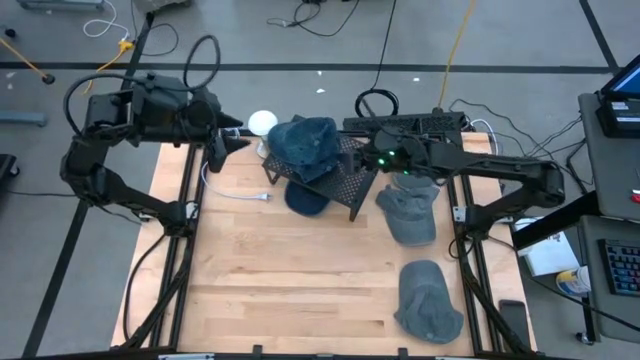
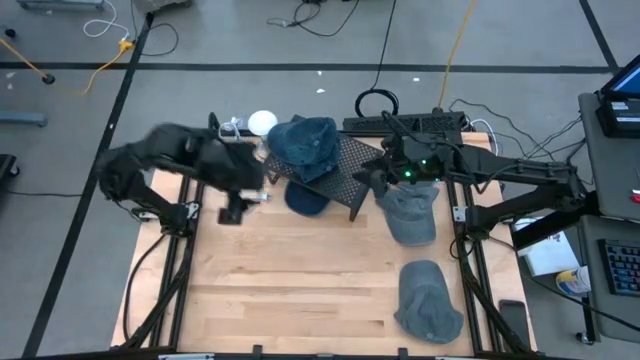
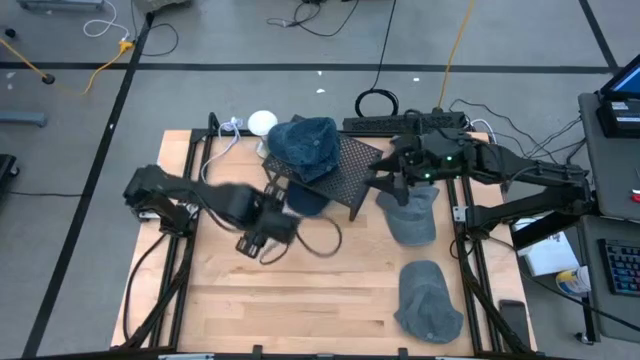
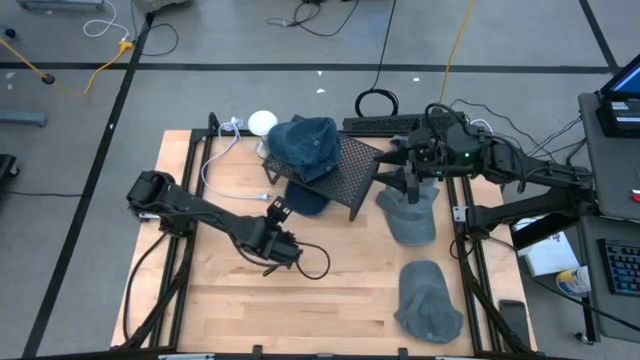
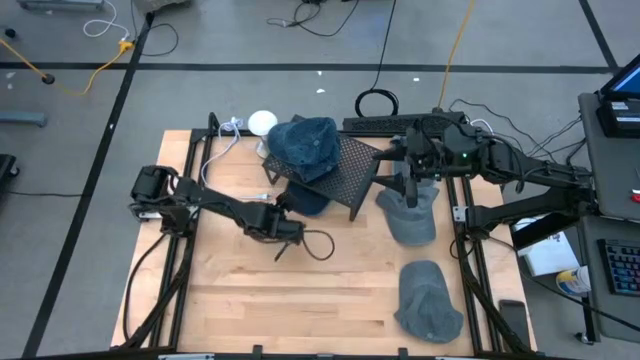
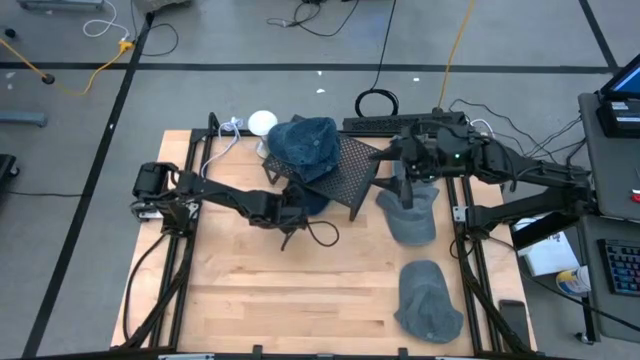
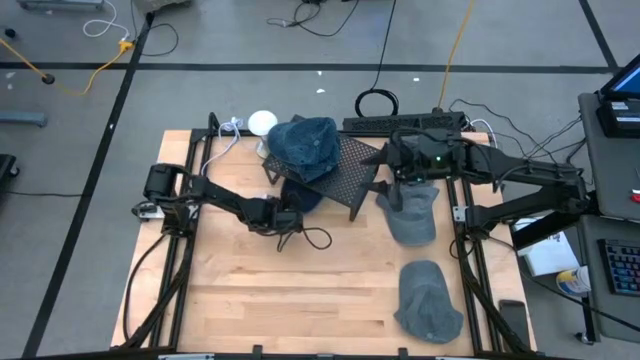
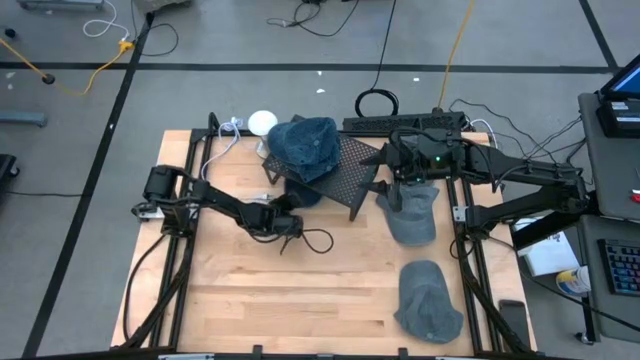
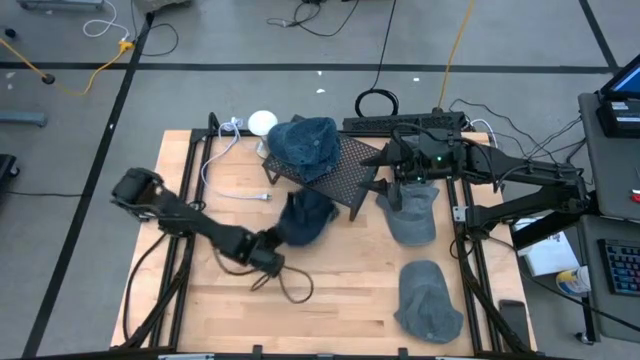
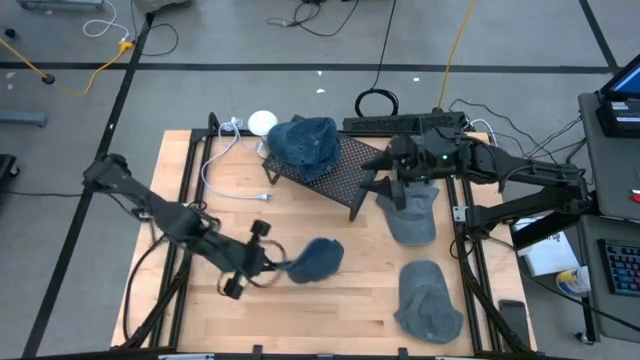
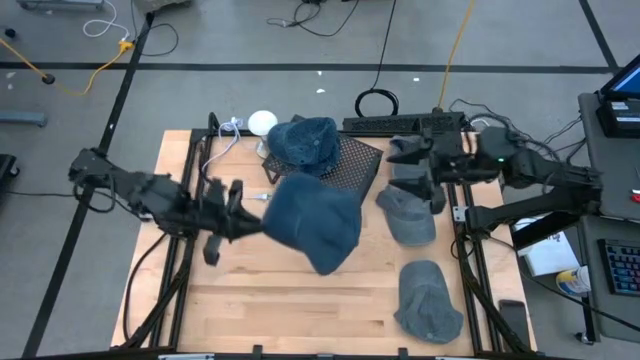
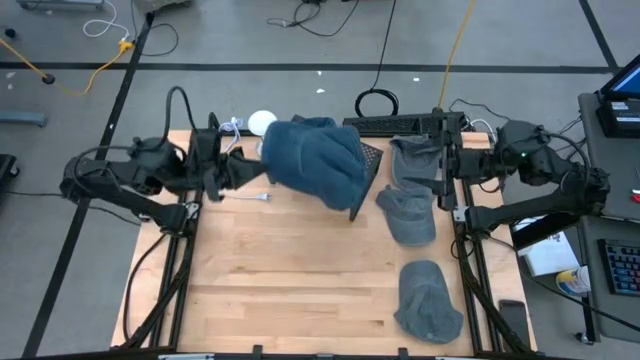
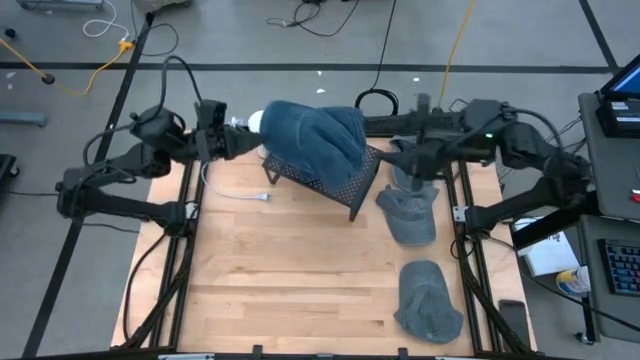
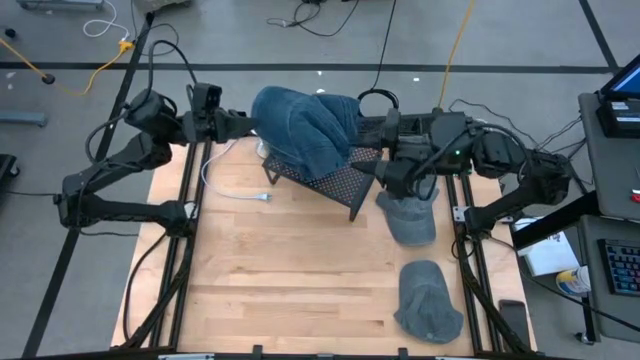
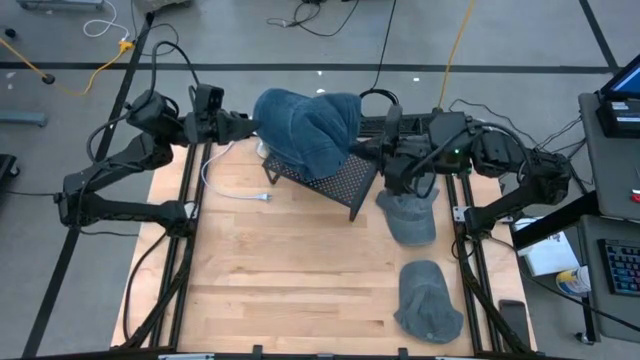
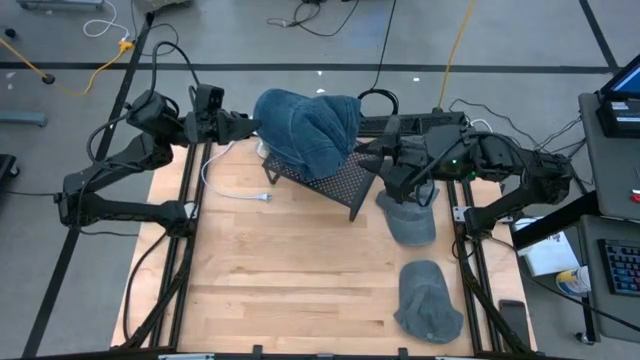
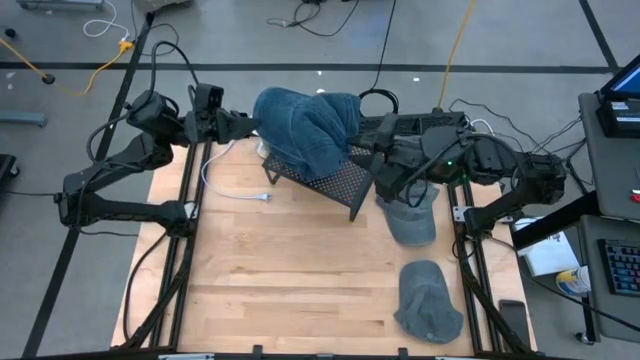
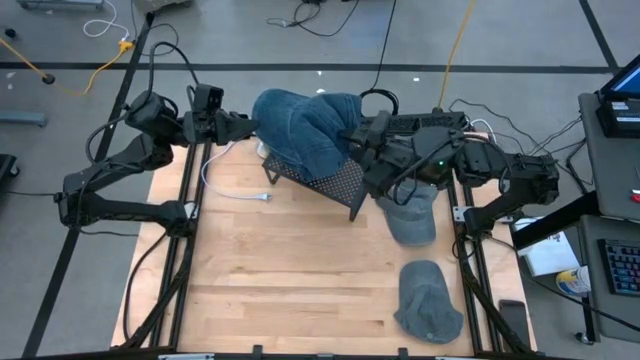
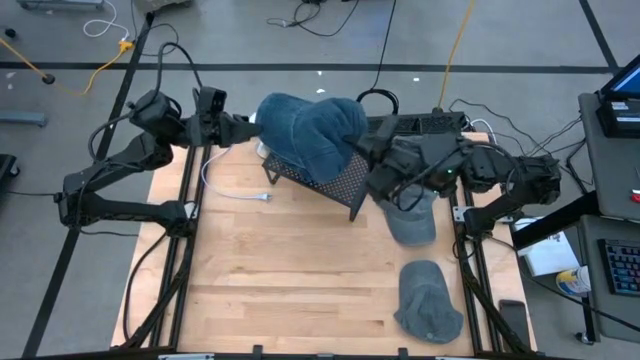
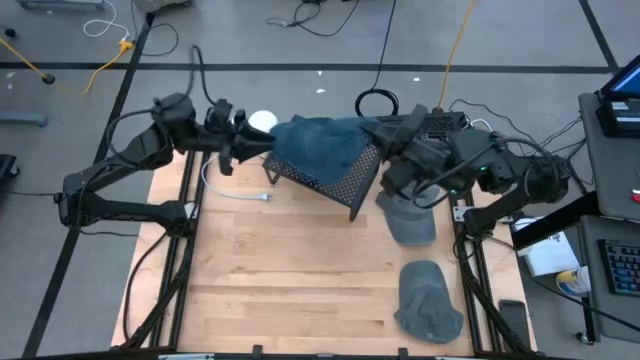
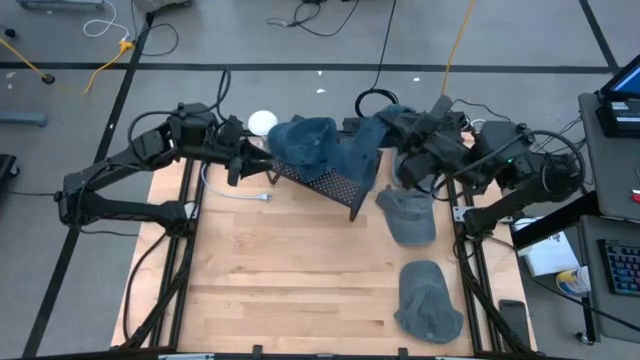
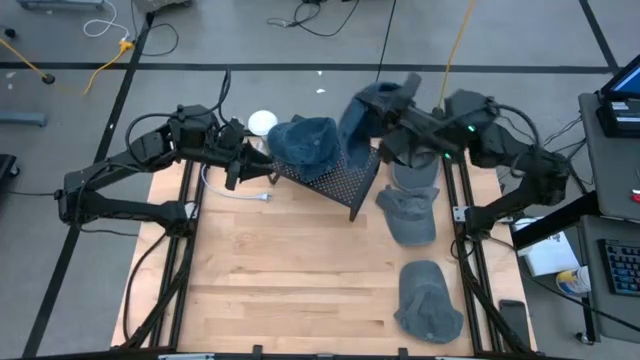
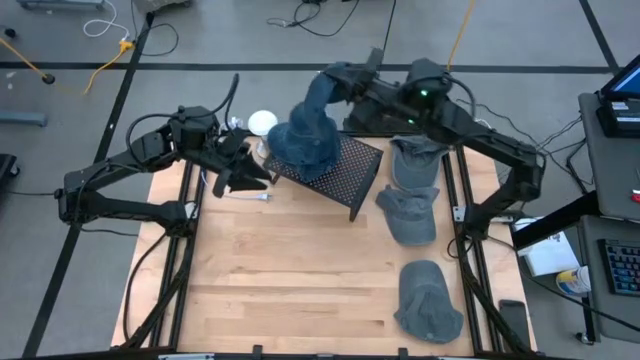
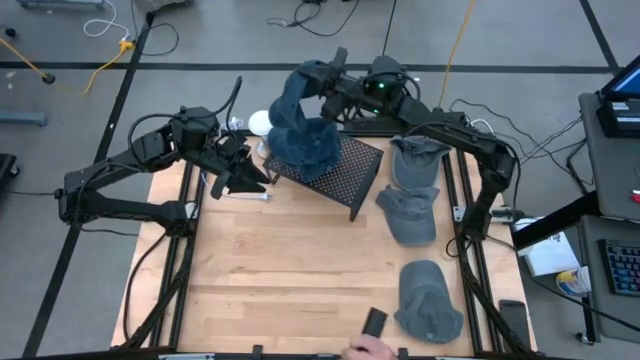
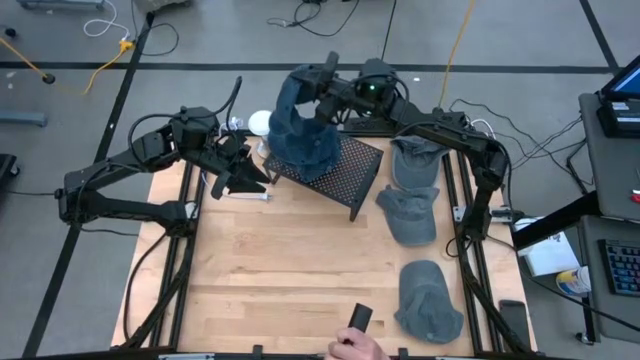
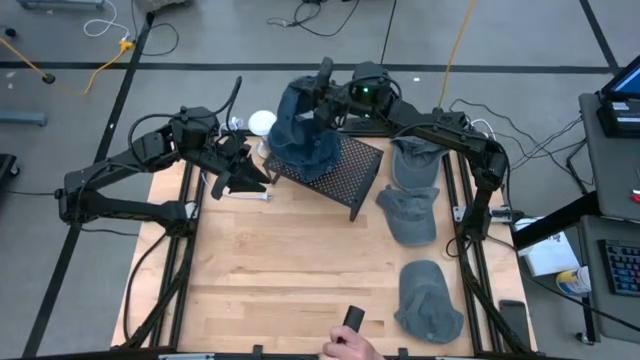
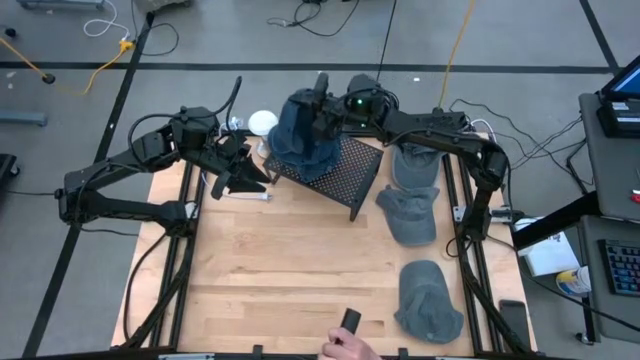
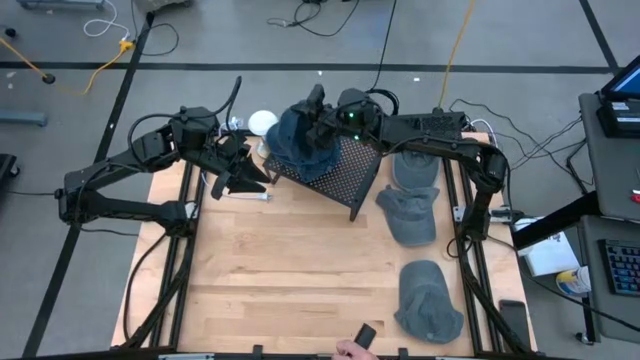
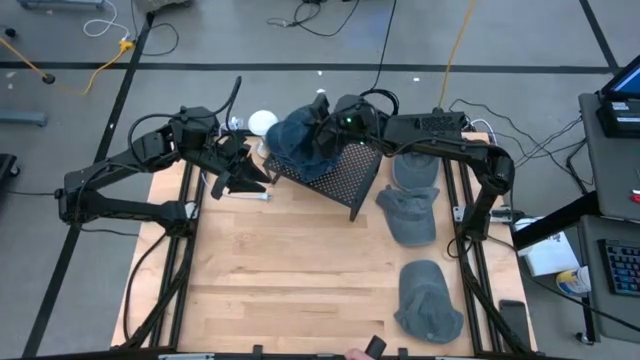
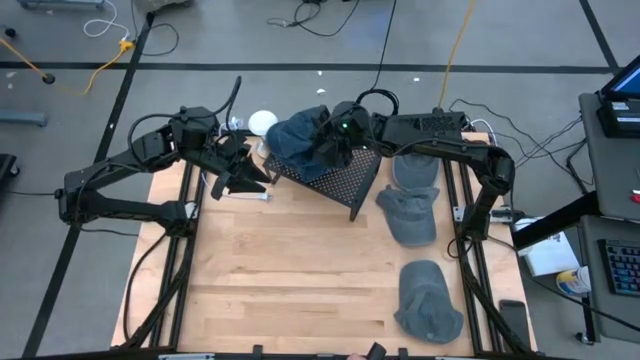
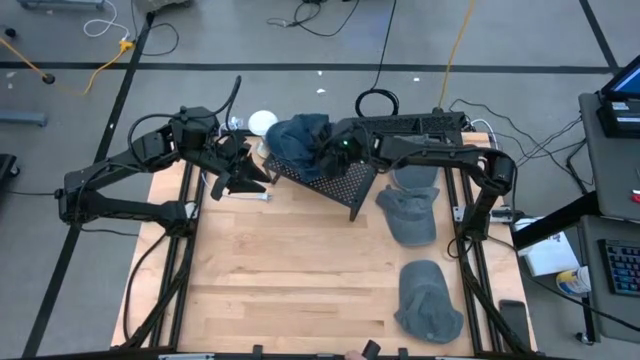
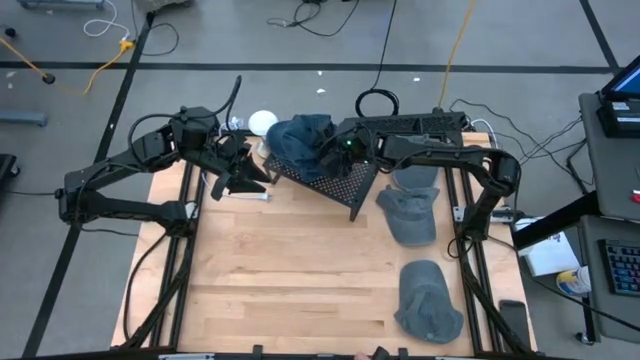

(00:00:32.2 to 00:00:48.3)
Task: Pick & Place hat
Stack the blue cap on the blue caps on the shelf

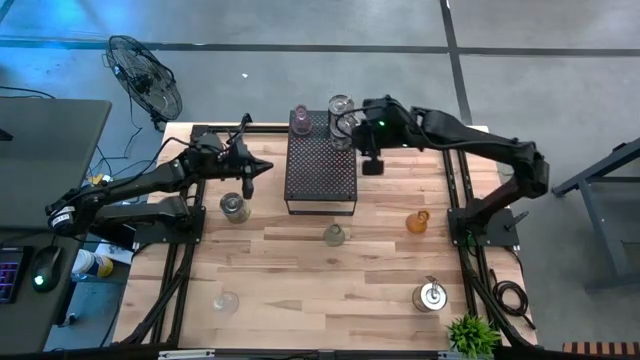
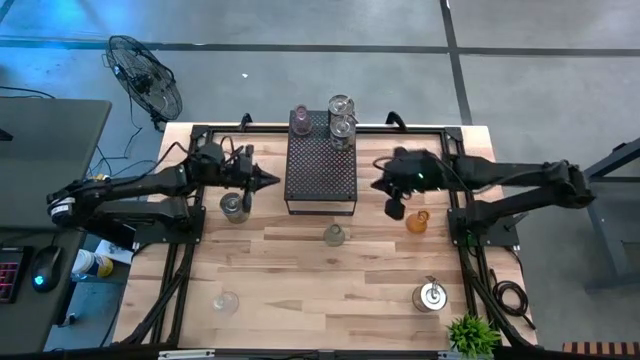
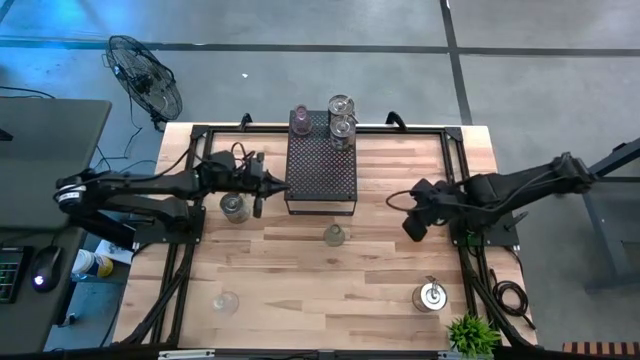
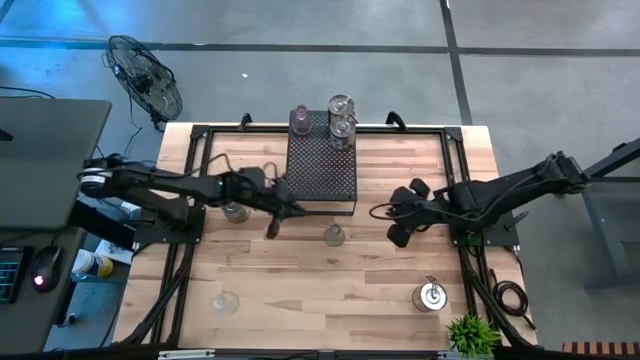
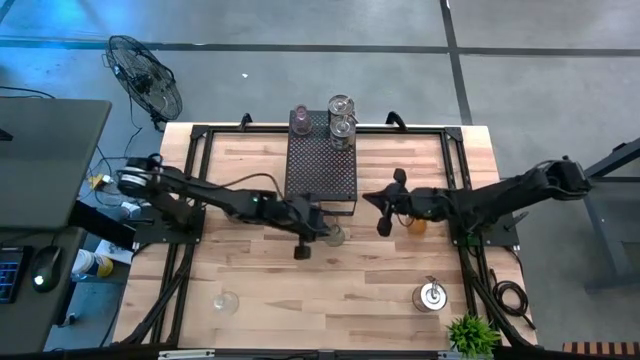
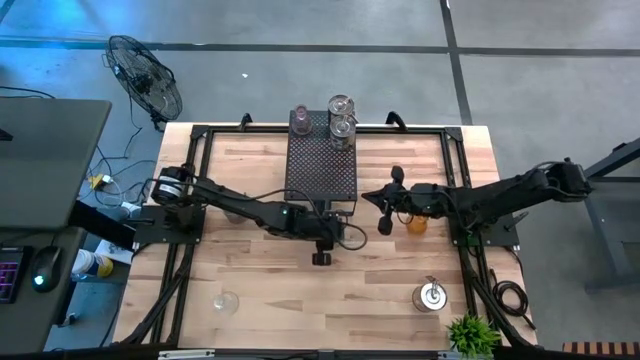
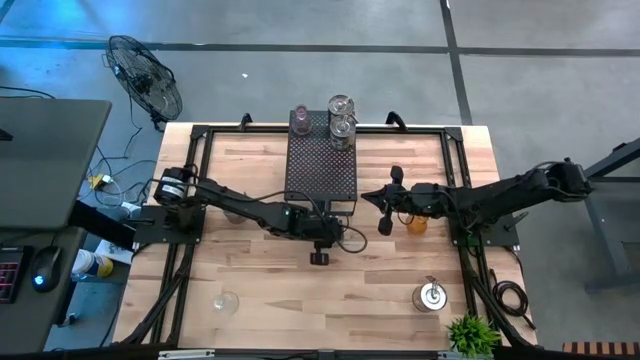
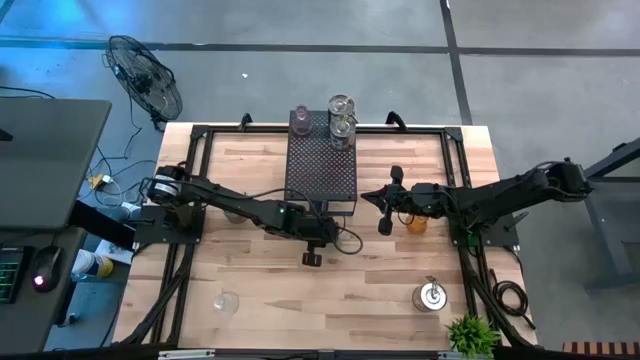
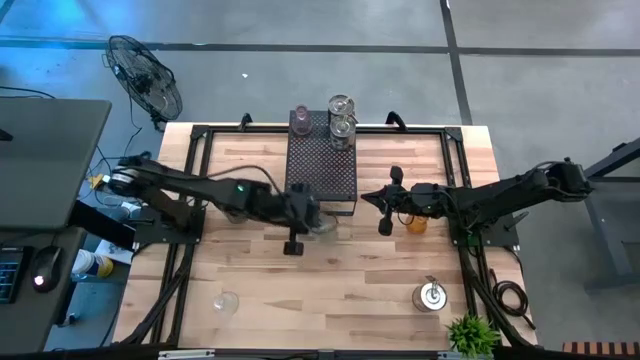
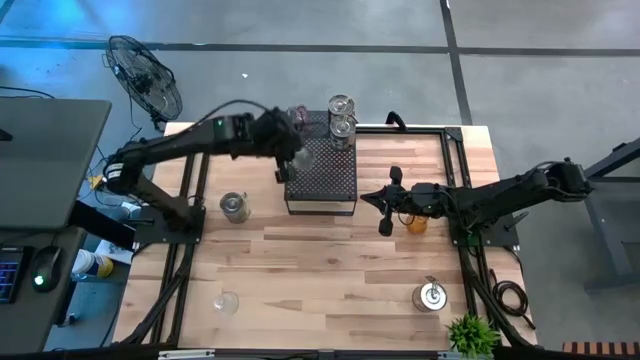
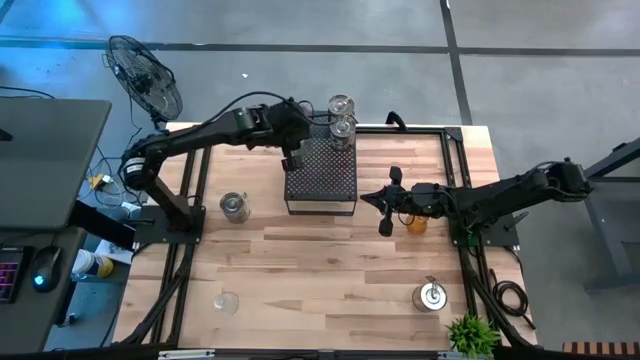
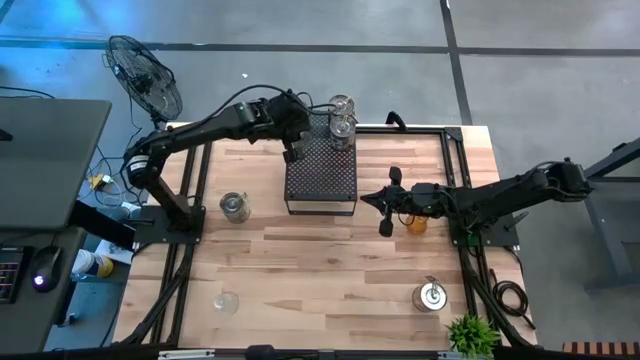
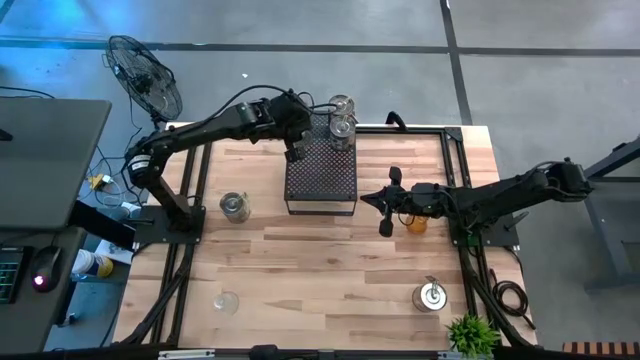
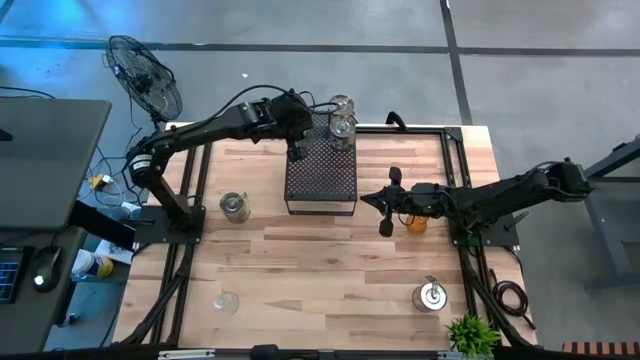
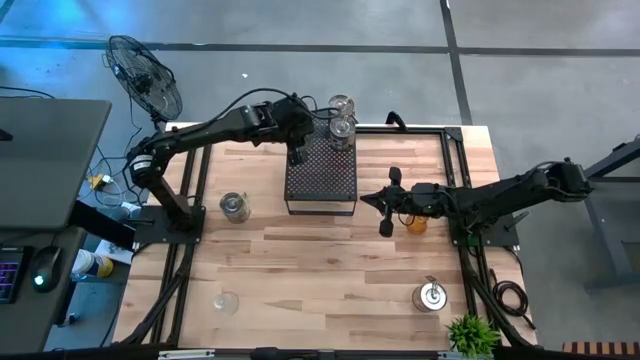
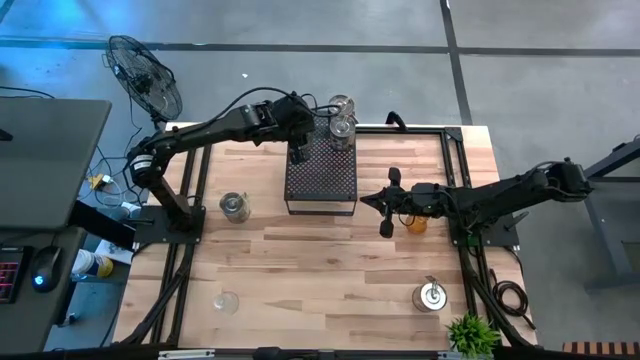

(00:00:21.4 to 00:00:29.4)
Task: Pick & Place candle stick holders
Put the green glass candle holder on the shelf
